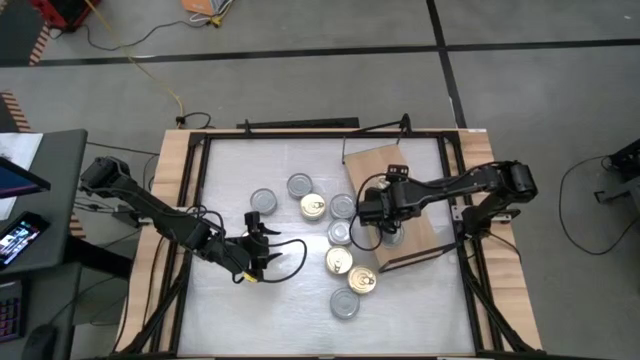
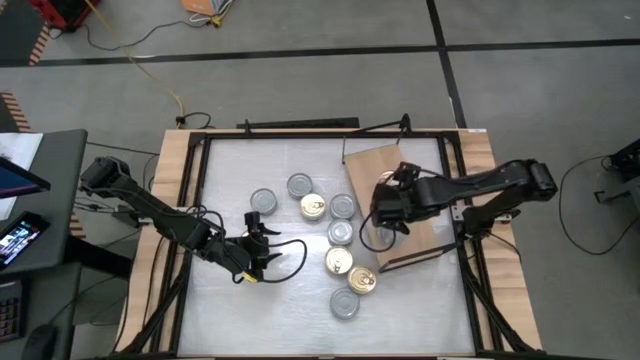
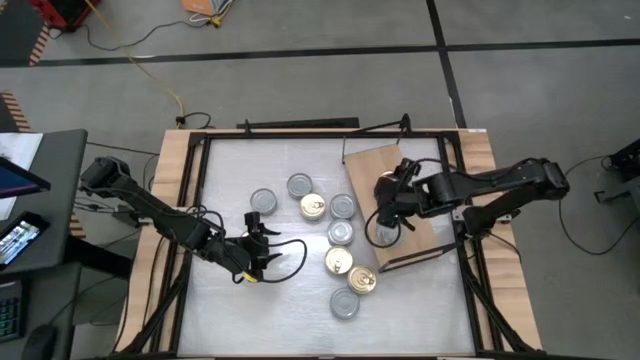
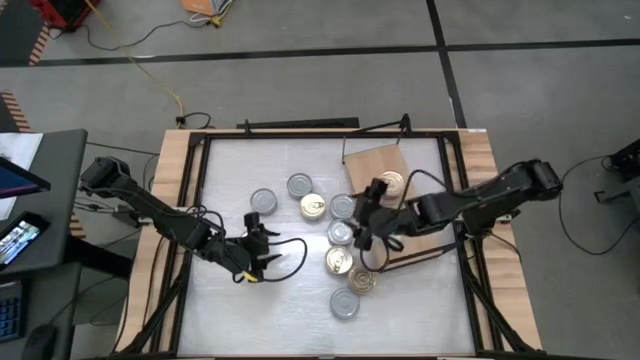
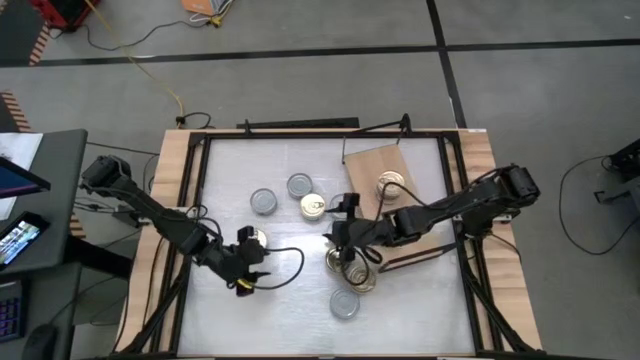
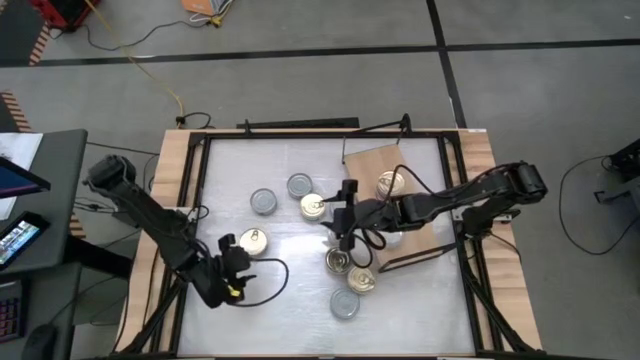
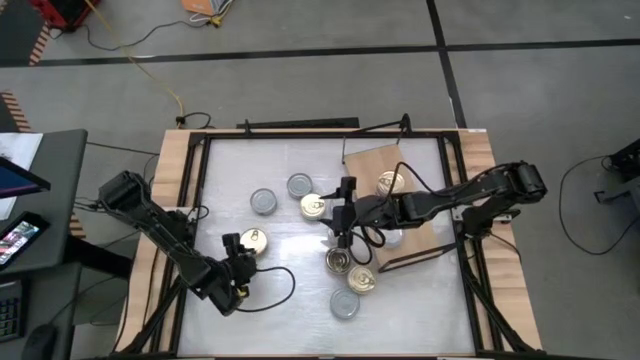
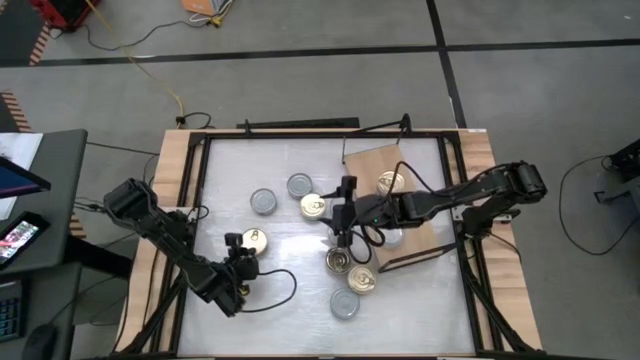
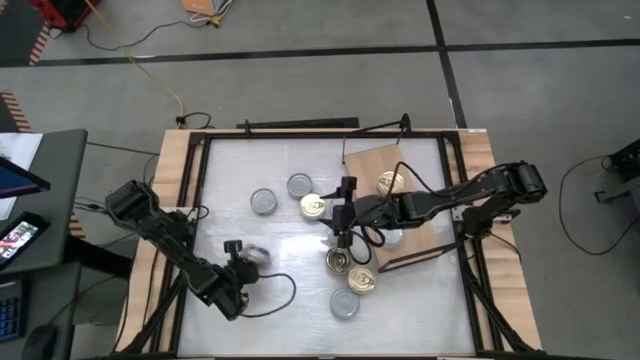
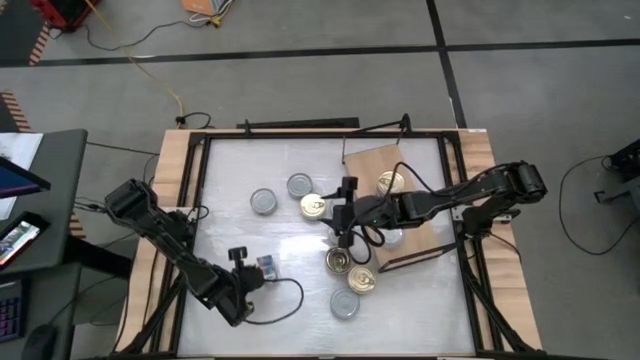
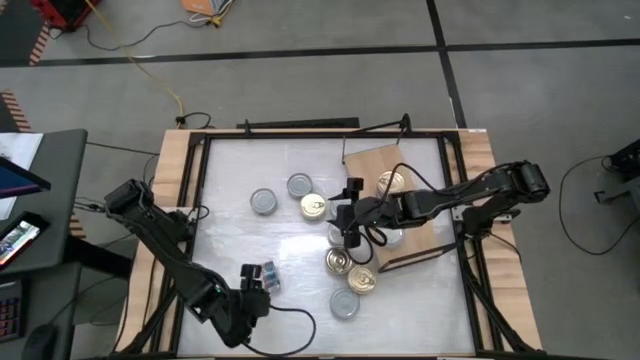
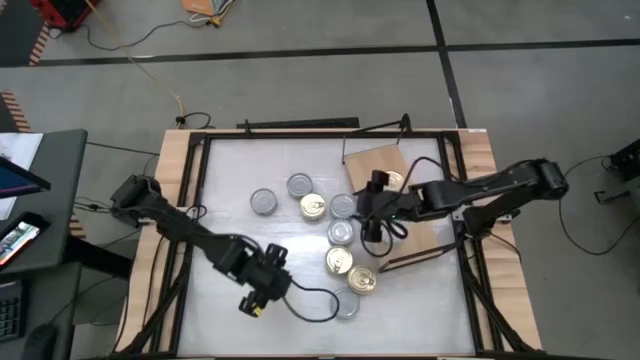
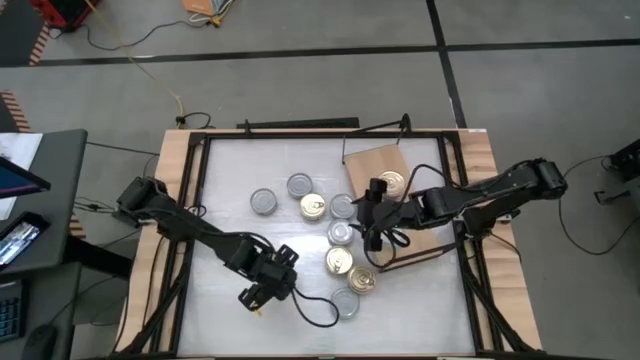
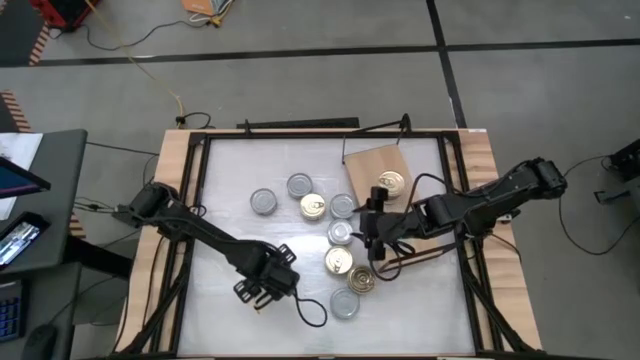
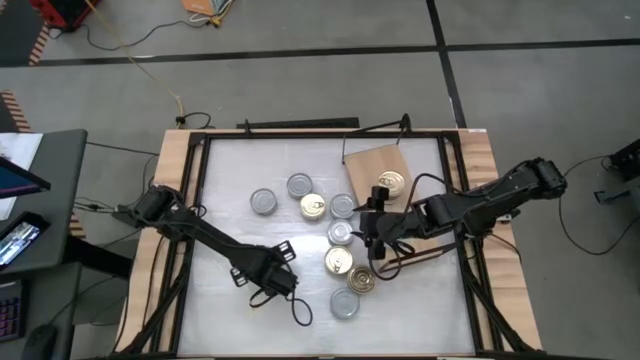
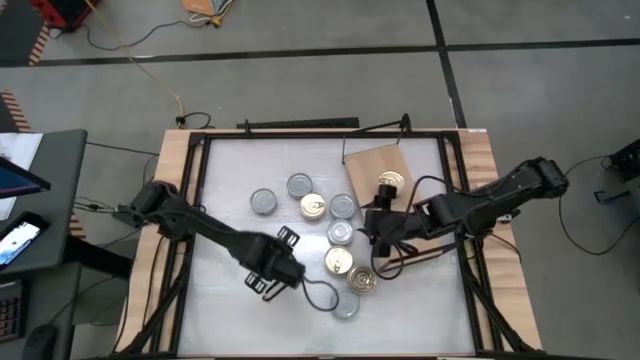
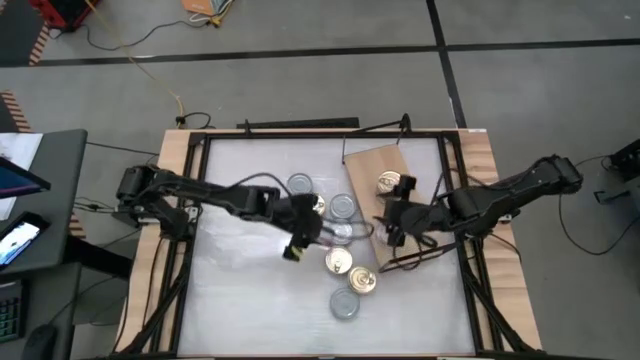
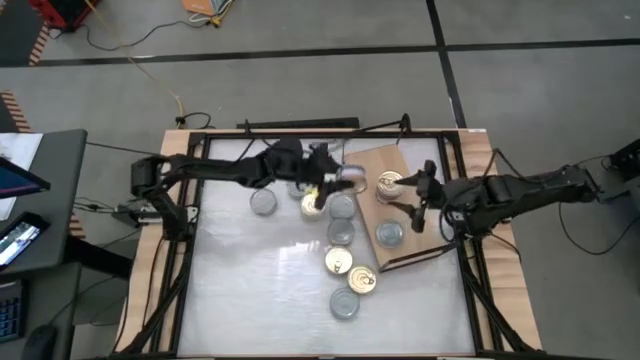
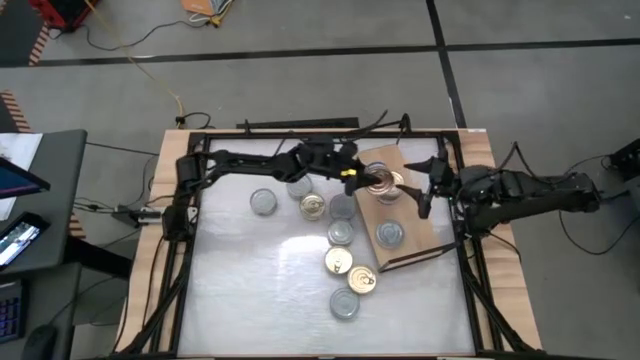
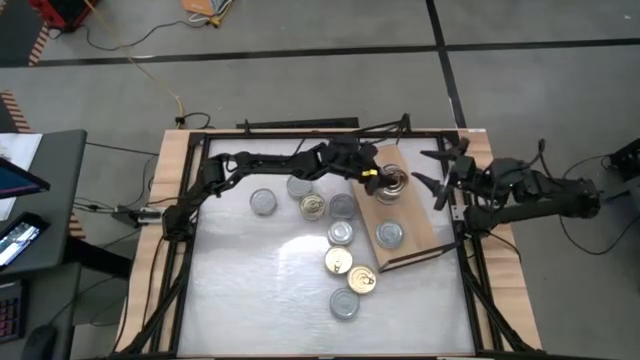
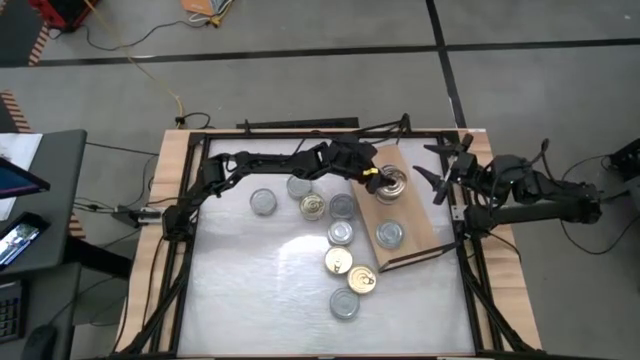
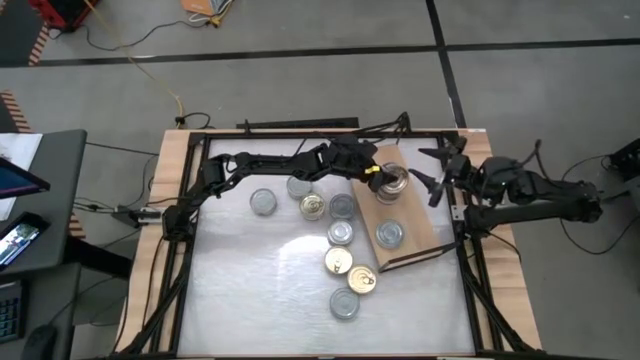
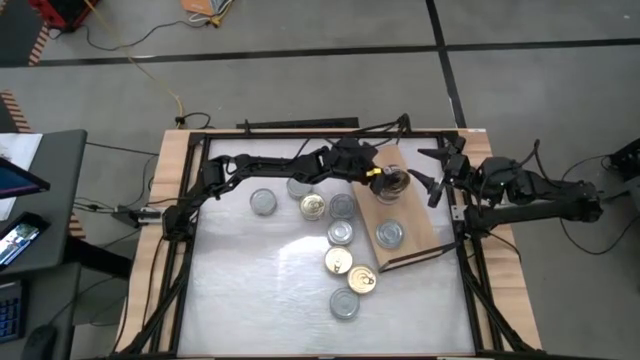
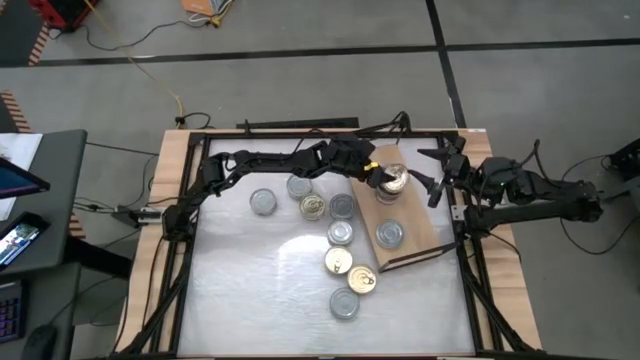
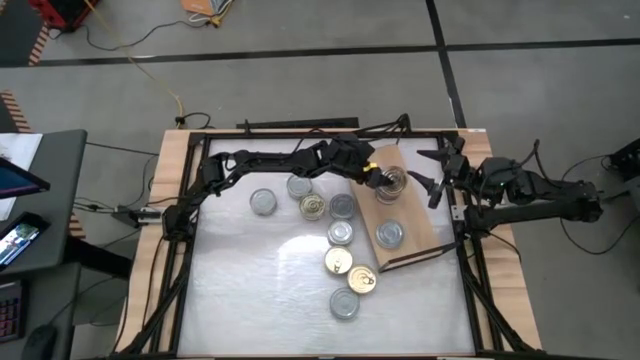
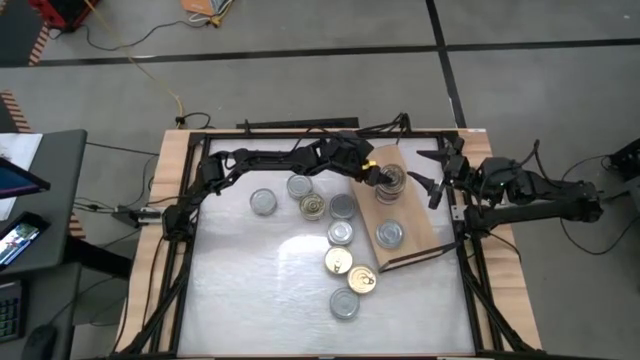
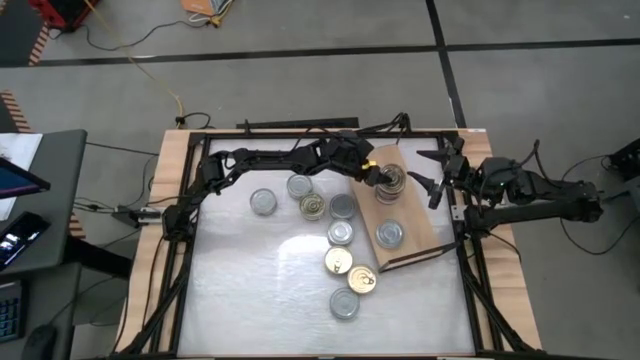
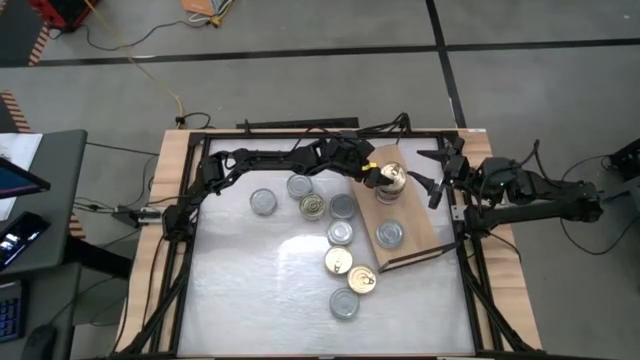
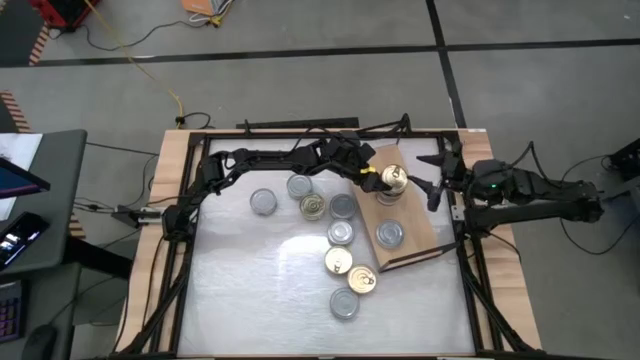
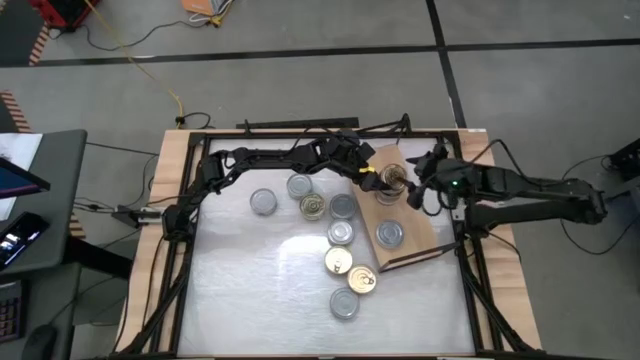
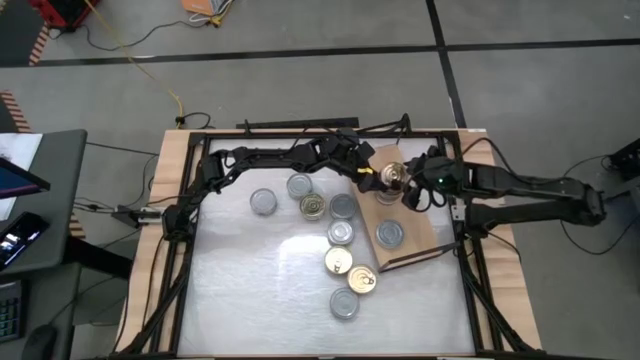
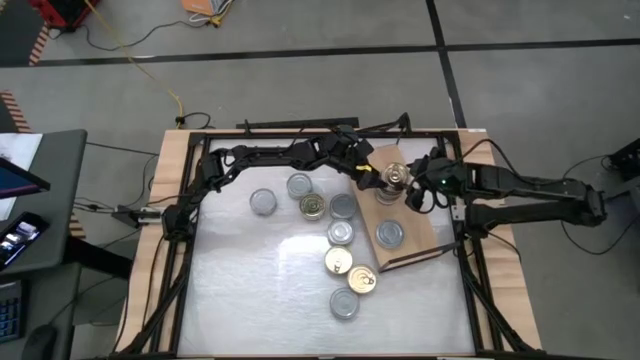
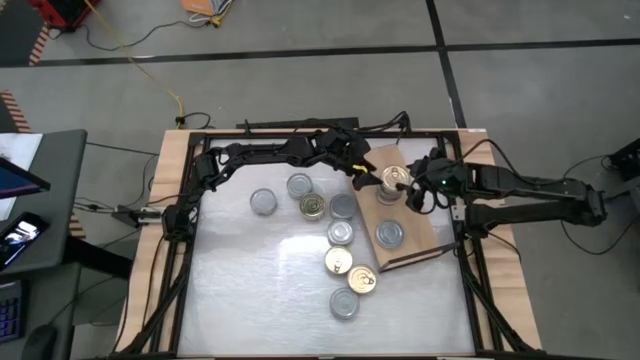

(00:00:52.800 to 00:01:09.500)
Task: Stack canned seafood by type on shelf
Stack the blue tuna can on the other blue tuna can on the shelf

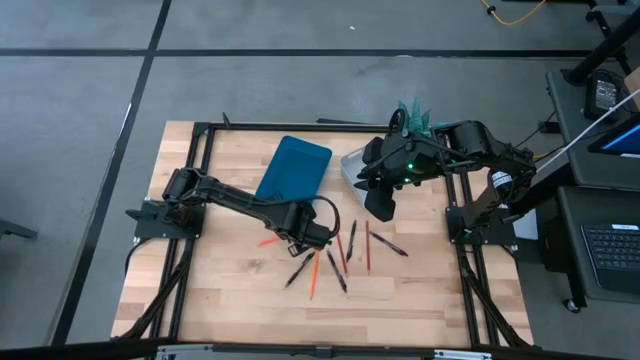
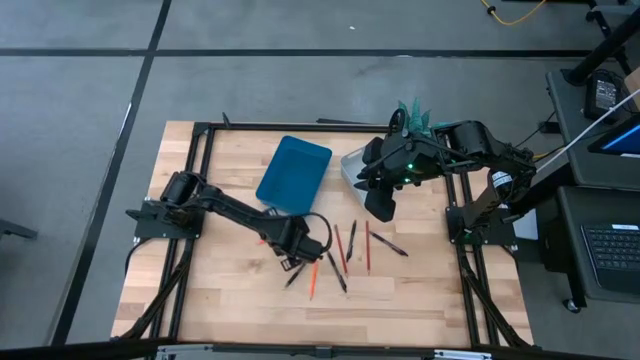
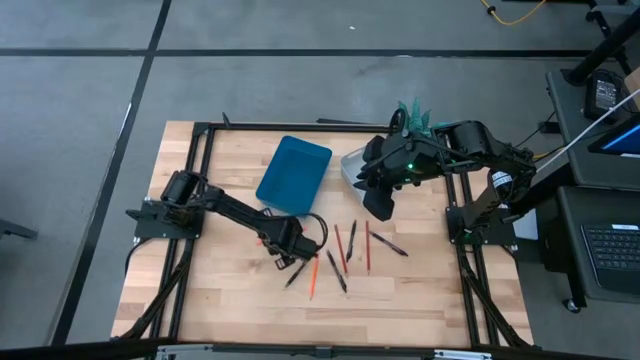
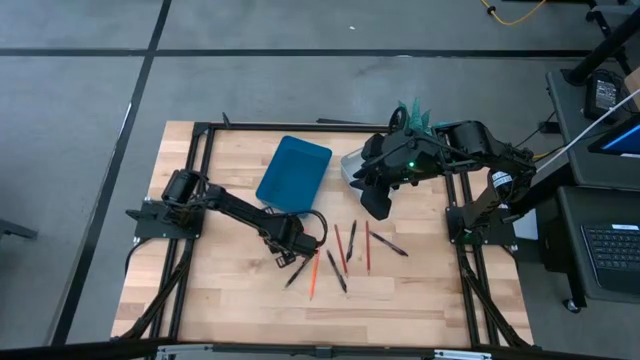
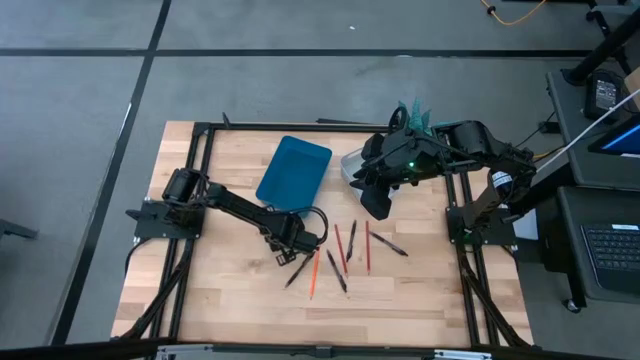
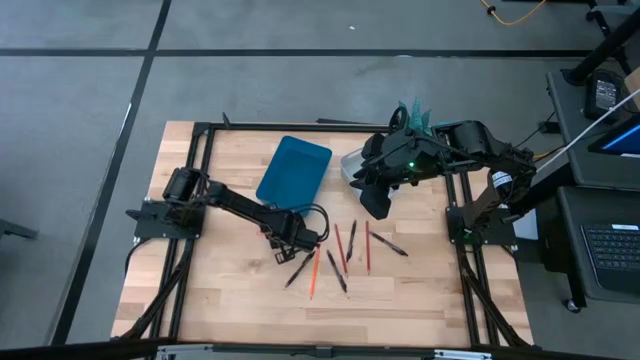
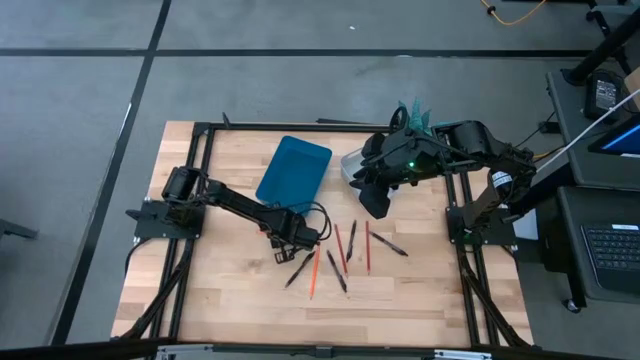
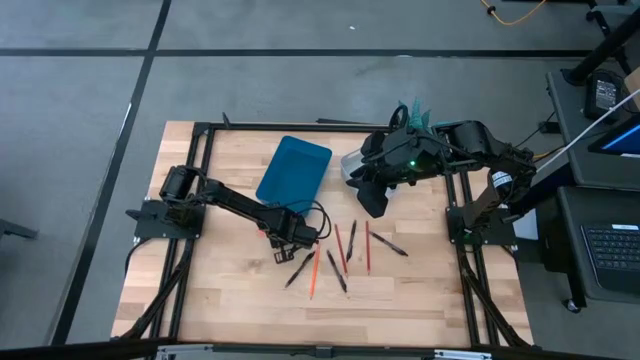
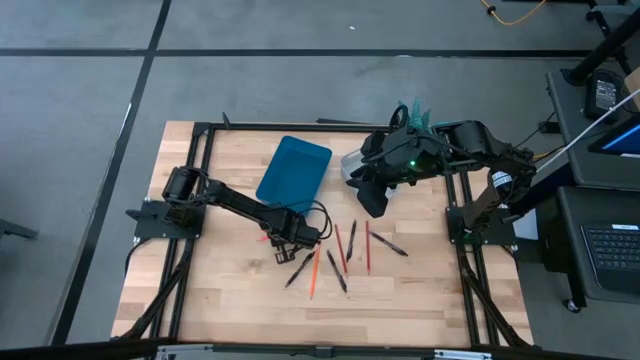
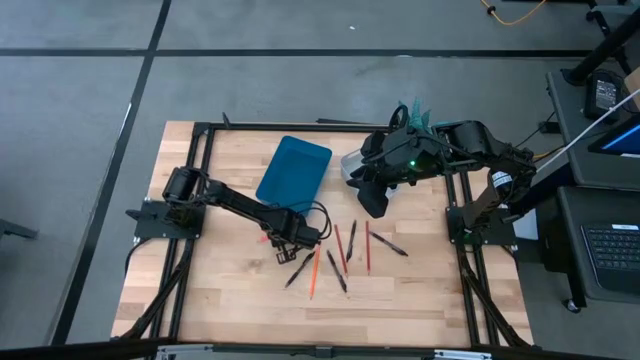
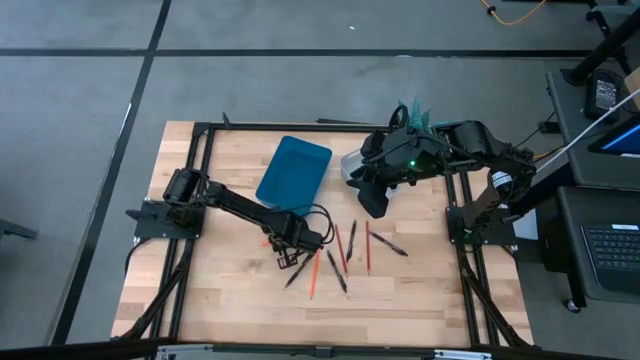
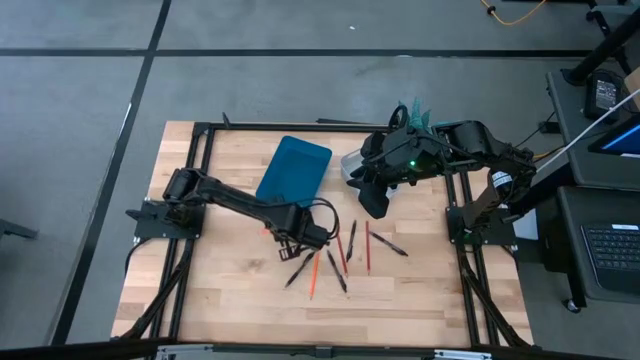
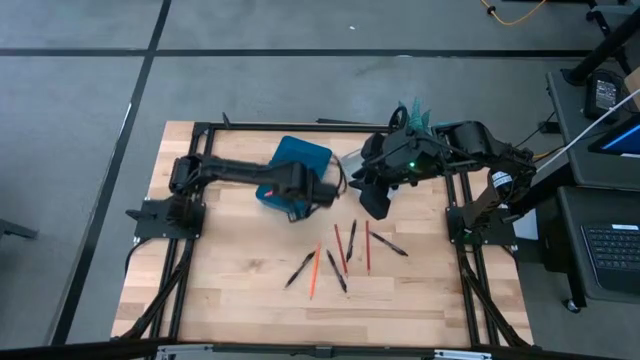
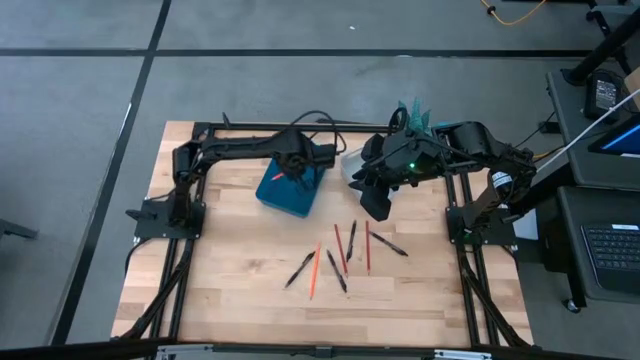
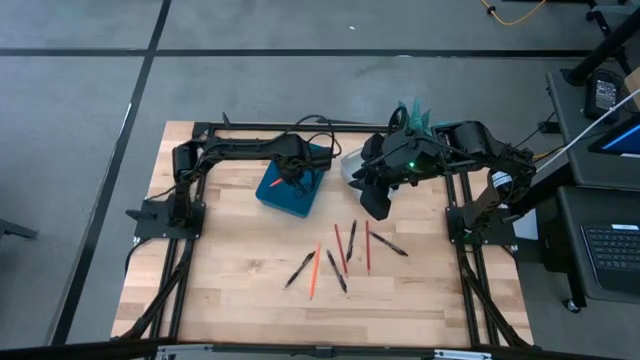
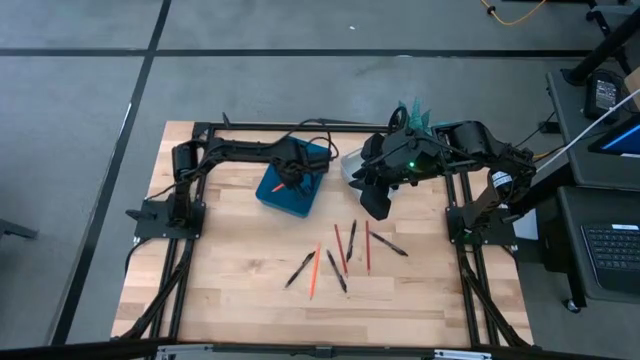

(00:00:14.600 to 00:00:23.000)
Task: Sort pens & pencils
Put the orange pencil into the blue bin
